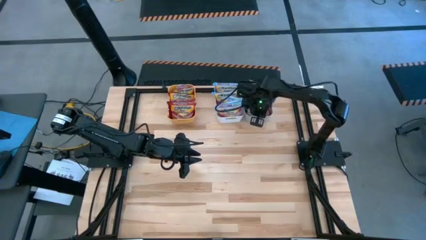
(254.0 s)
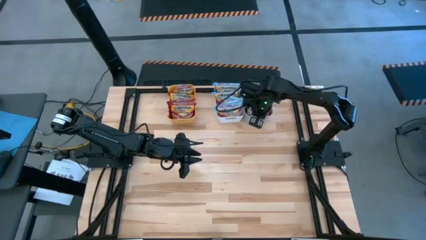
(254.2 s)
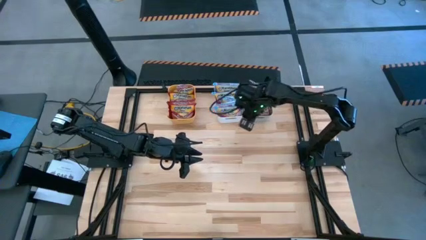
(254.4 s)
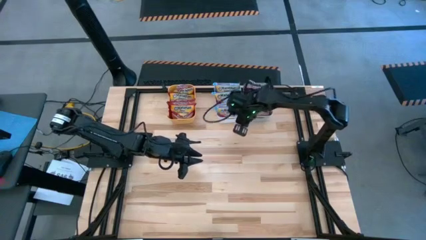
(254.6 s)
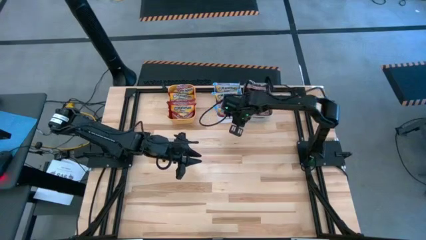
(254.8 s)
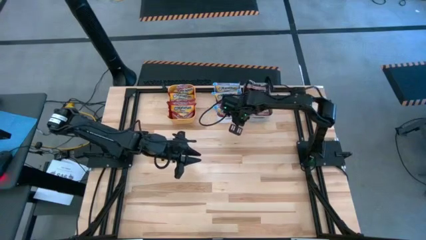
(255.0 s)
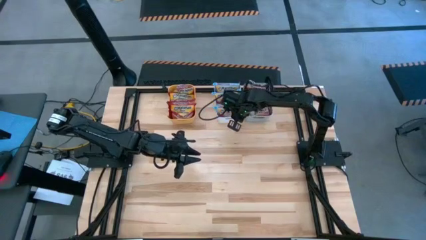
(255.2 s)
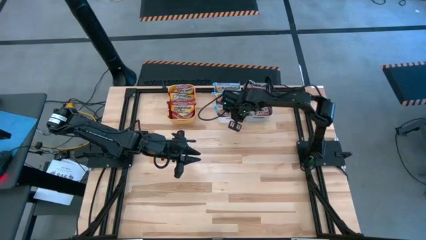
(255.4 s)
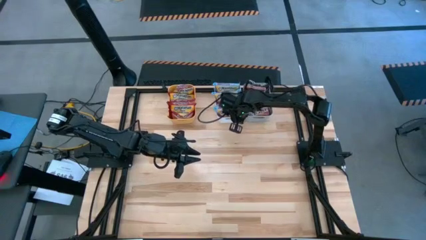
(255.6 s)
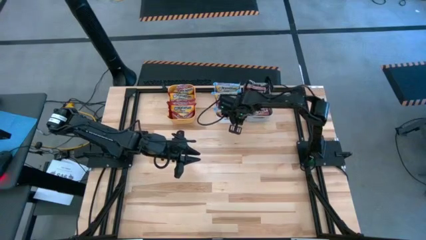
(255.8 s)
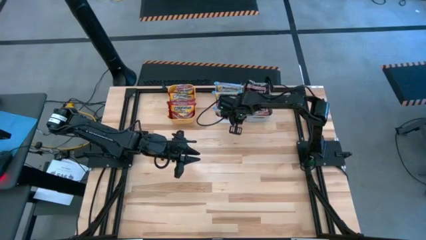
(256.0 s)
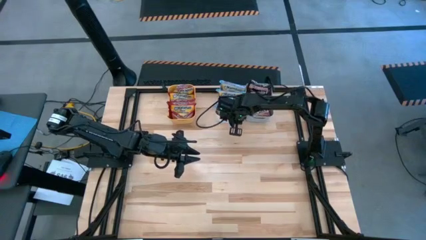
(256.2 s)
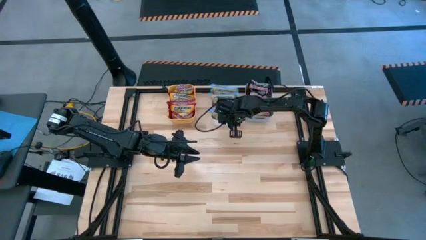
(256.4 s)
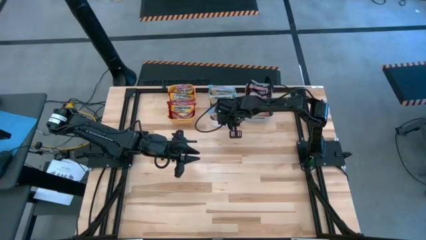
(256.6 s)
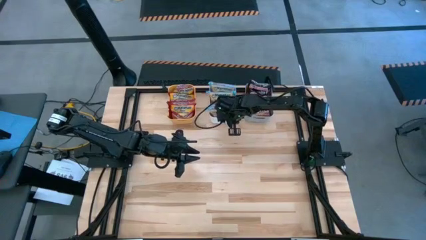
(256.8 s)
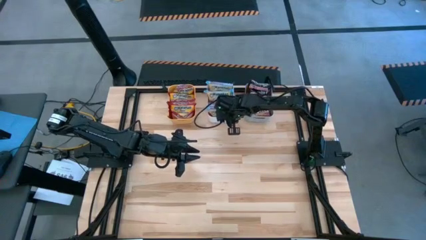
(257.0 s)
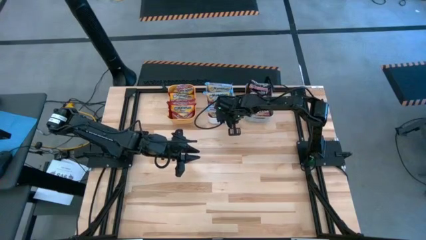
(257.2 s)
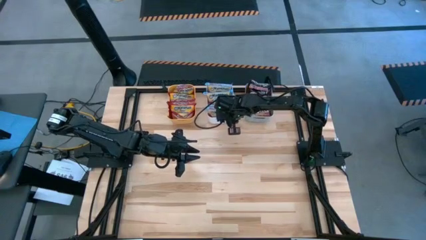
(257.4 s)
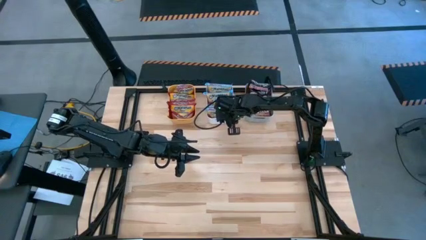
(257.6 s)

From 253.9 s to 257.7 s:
Task: Sort Maruchan noodles
Adjust the white bin

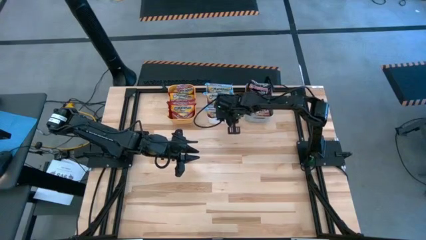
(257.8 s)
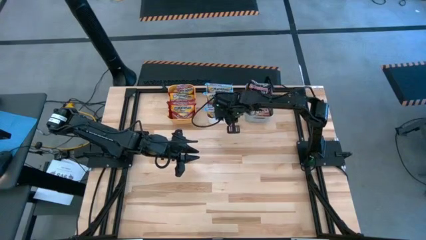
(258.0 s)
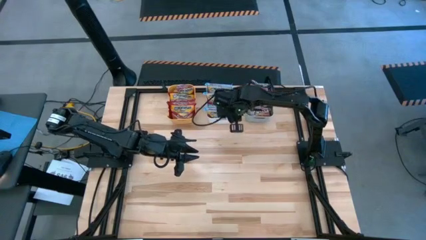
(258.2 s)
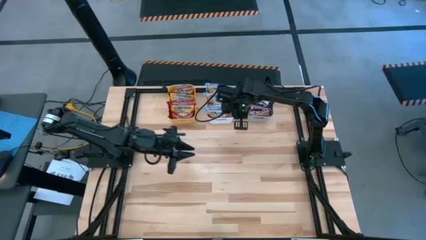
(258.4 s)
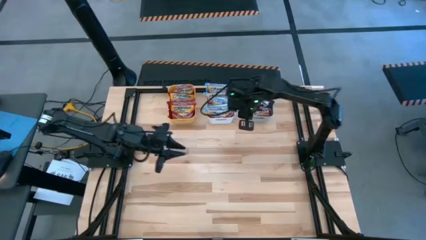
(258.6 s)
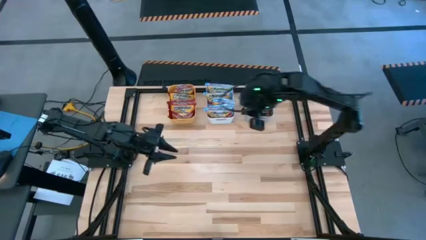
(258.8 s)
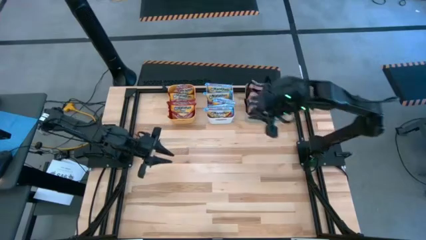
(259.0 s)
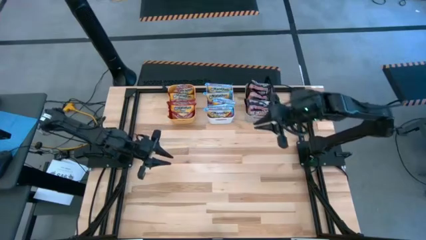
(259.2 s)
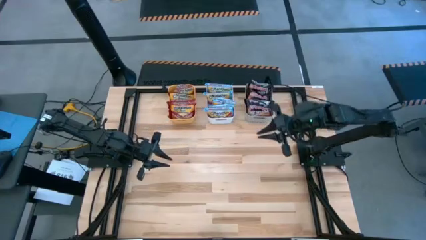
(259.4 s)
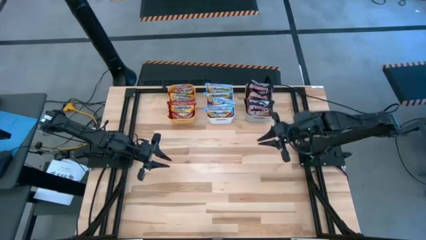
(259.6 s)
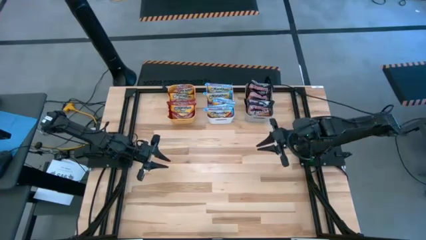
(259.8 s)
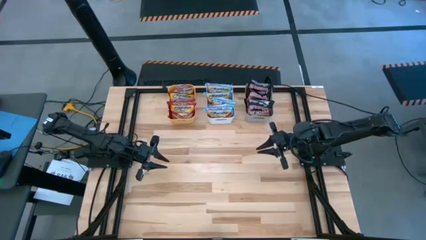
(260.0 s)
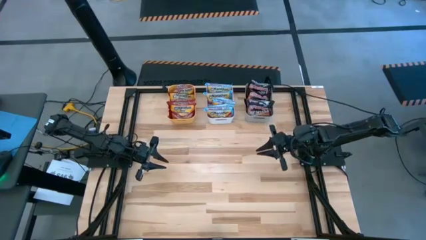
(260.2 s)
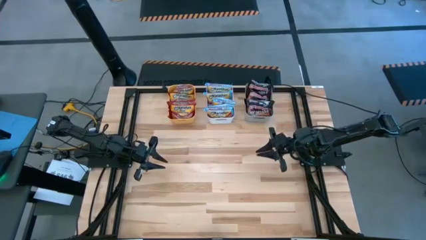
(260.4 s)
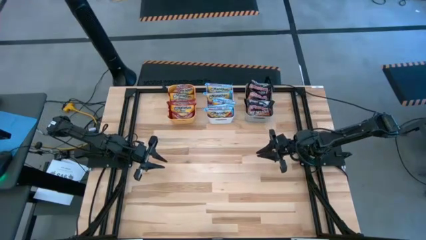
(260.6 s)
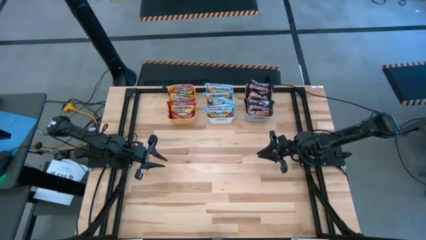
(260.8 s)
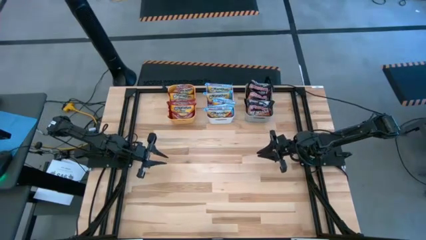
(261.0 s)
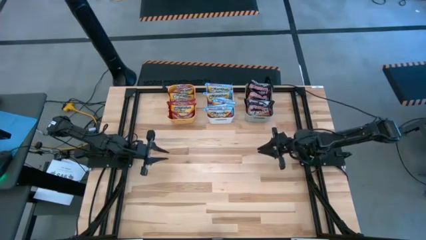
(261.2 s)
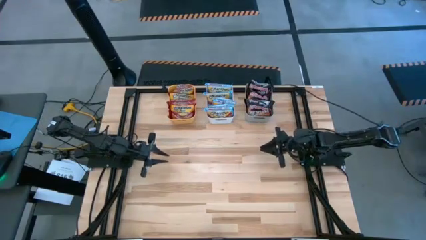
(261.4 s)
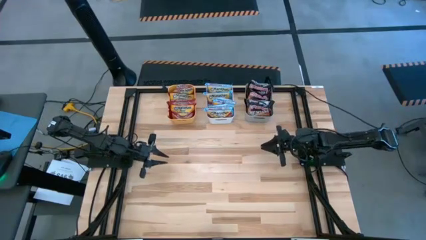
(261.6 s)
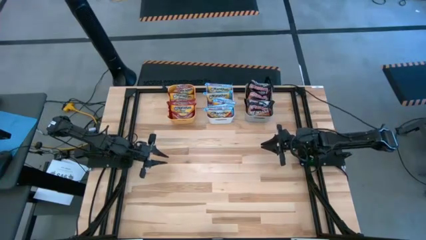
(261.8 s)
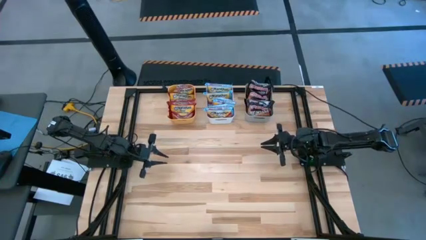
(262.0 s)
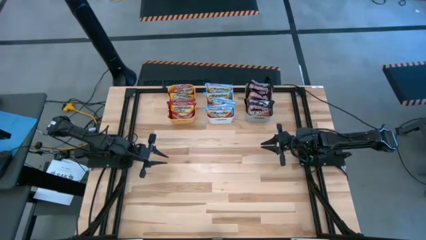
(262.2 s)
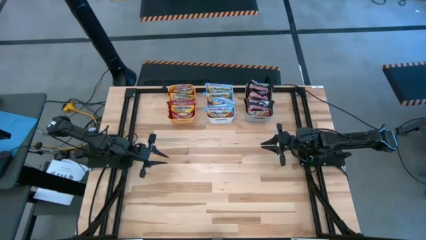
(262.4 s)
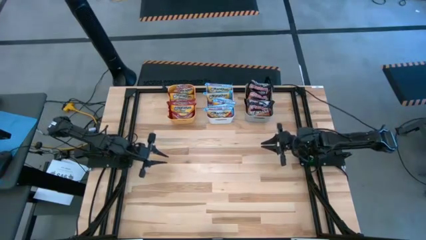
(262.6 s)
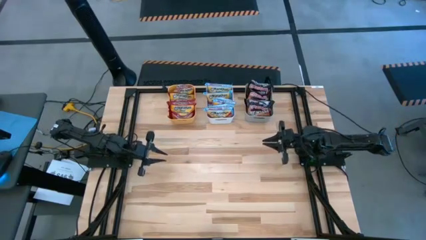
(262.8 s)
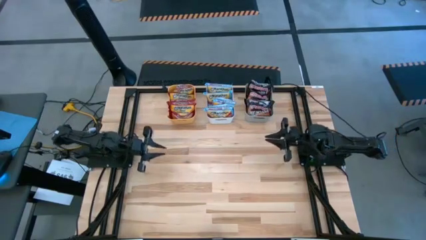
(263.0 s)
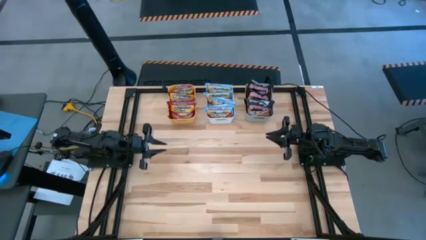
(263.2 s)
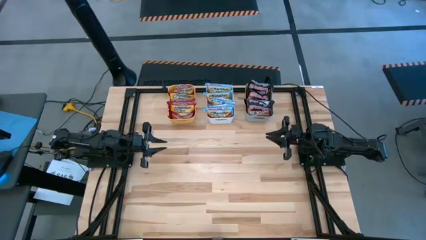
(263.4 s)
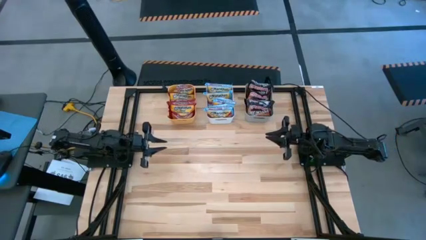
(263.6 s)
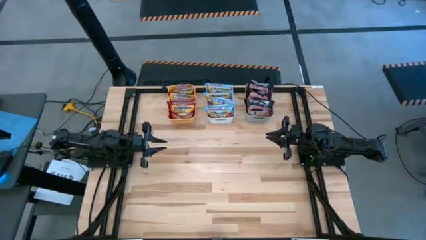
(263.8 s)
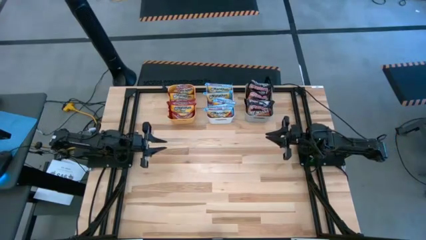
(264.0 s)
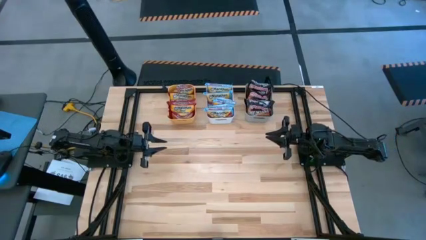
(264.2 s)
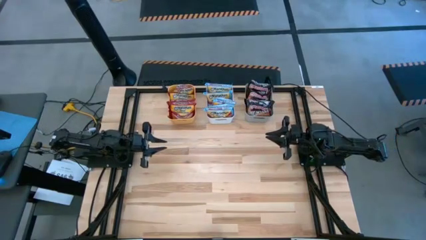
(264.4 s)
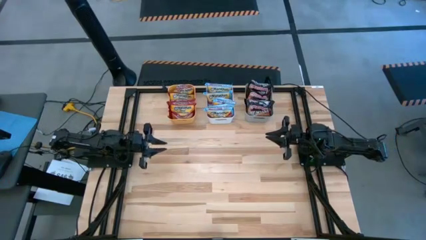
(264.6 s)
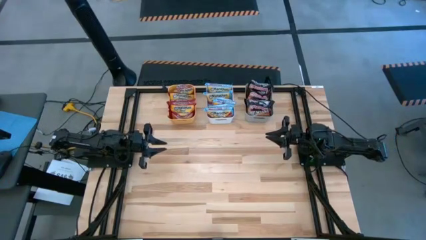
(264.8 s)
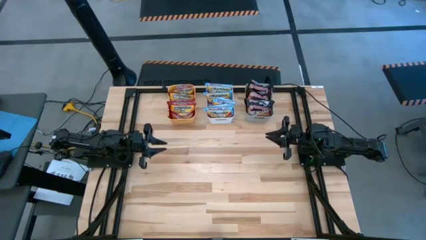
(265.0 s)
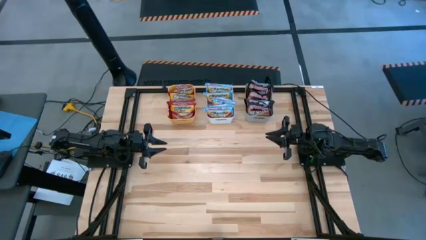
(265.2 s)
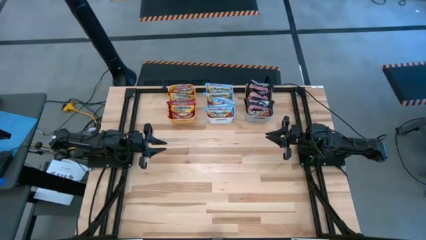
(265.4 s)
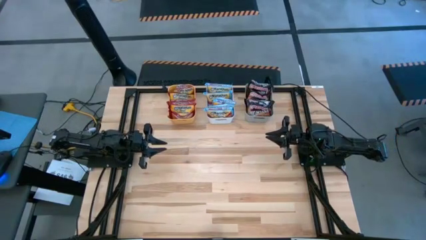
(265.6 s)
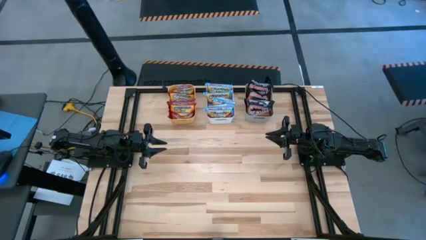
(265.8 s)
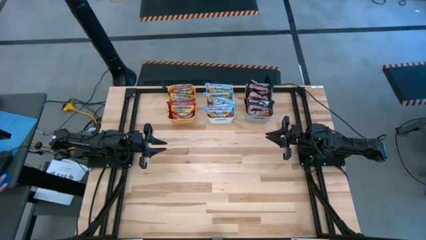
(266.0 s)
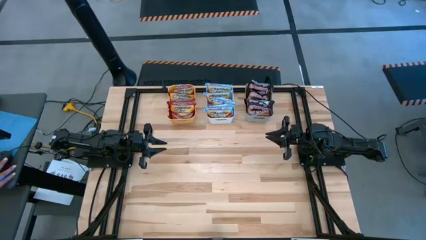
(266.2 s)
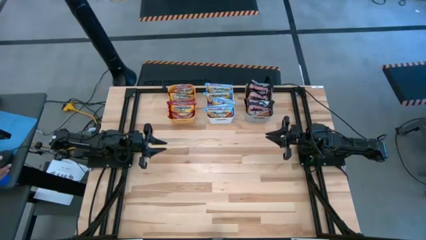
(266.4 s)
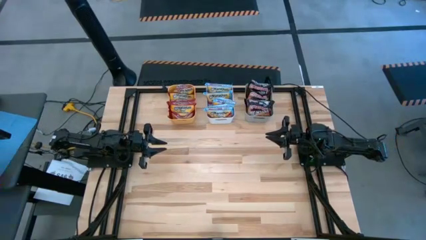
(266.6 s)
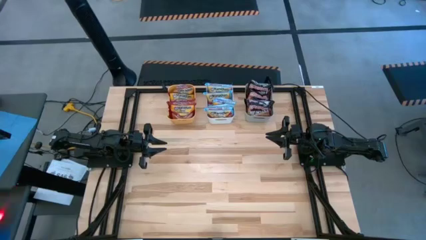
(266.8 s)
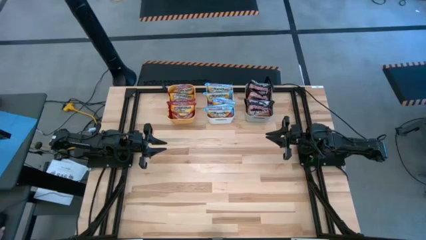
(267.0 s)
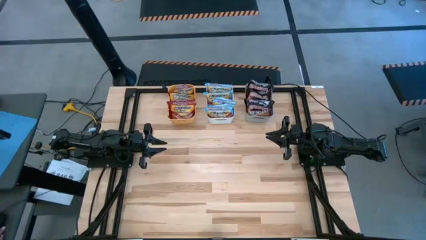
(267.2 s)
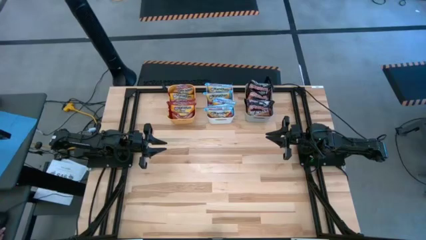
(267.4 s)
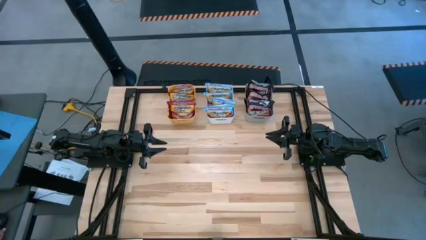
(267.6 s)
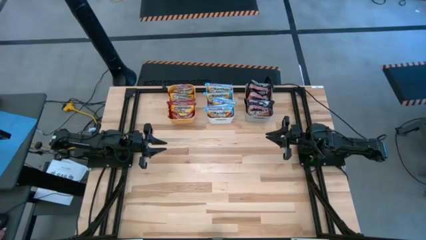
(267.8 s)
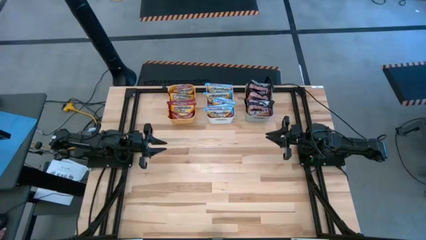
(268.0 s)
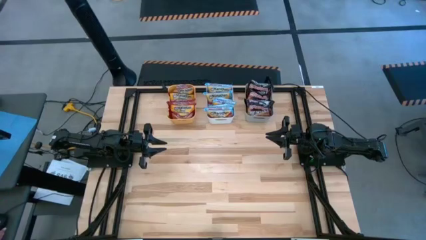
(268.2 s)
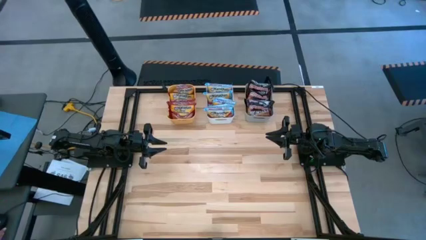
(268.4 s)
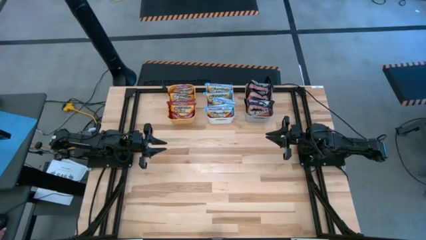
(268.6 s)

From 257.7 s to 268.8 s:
Return to Home Position

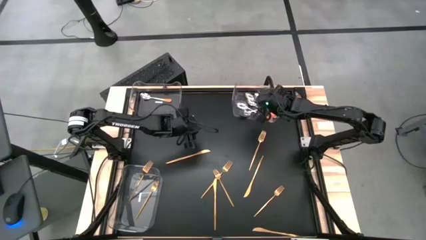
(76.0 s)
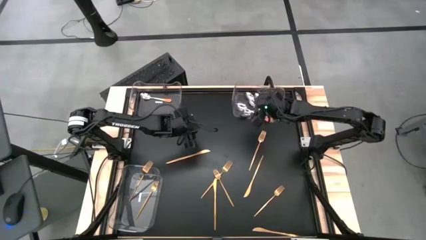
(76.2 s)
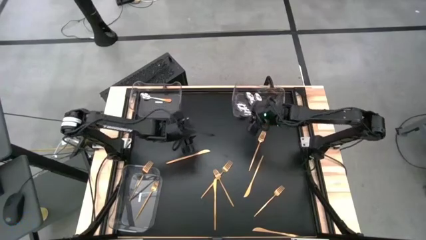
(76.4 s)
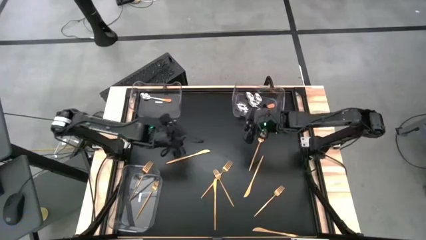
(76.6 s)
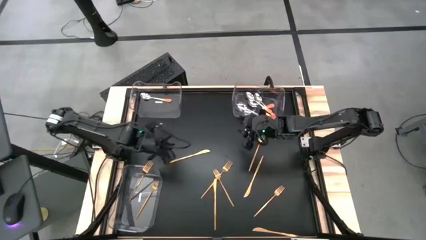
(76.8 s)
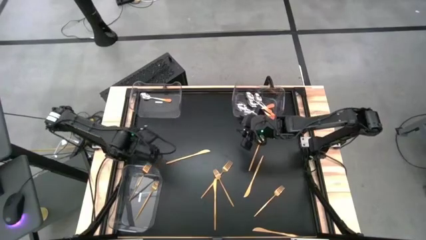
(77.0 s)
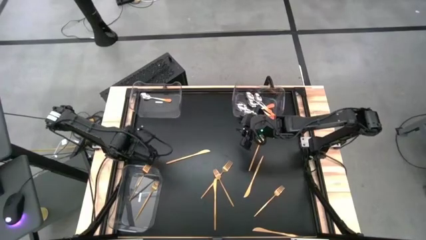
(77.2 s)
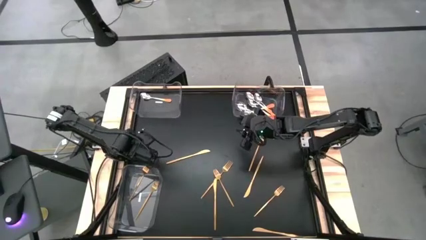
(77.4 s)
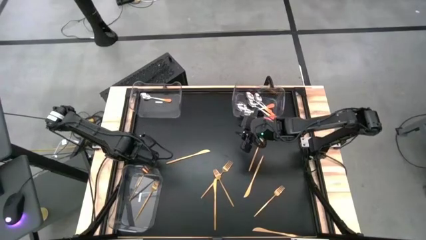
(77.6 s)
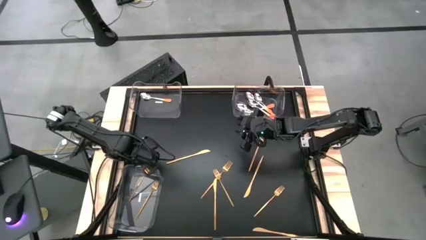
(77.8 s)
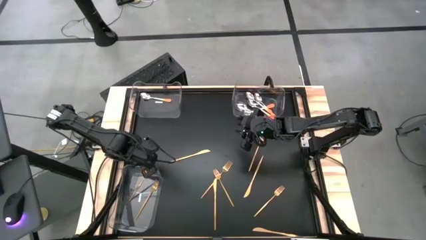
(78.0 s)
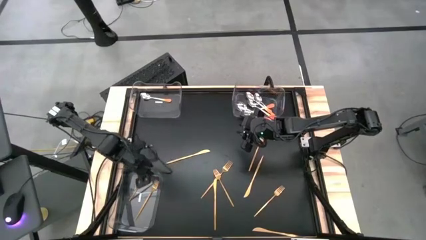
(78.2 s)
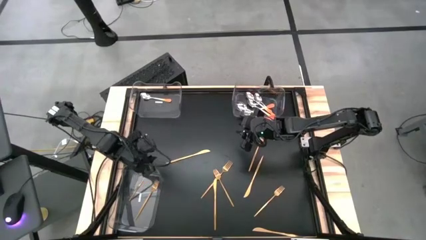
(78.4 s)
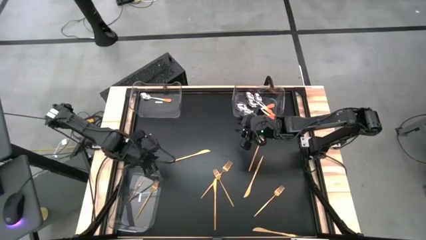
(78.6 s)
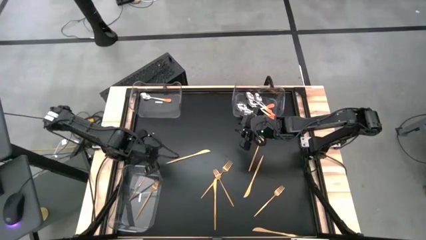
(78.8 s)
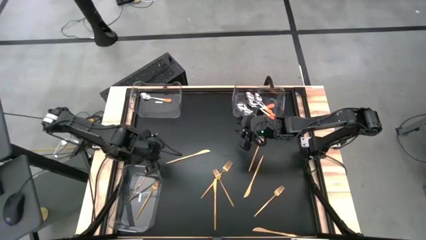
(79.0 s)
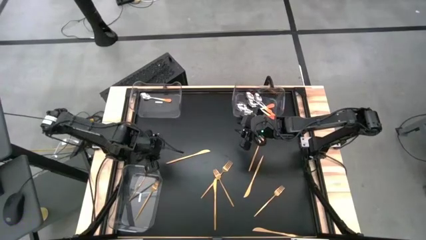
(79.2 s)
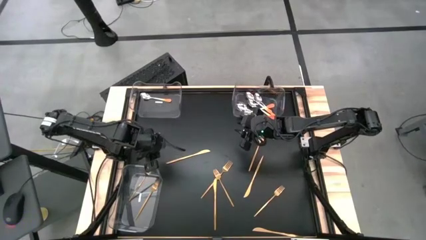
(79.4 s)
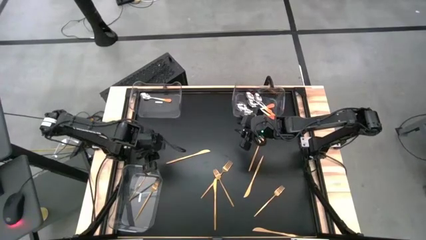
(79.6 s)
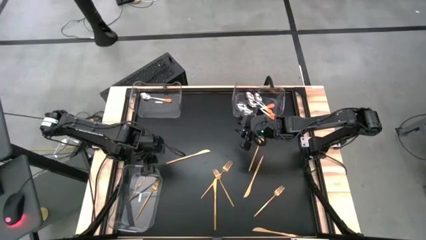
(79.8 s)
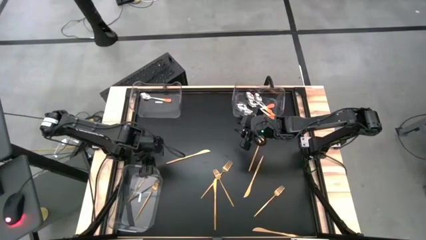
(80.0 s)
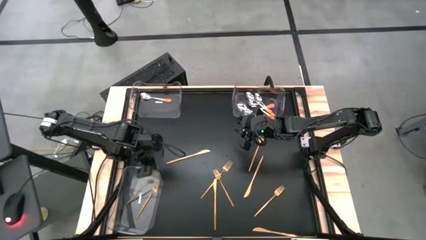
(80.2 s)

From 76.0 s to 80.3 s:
Task: Sort silverware by color (type)
Adjust the gold fork in the bottom left transparent bin
